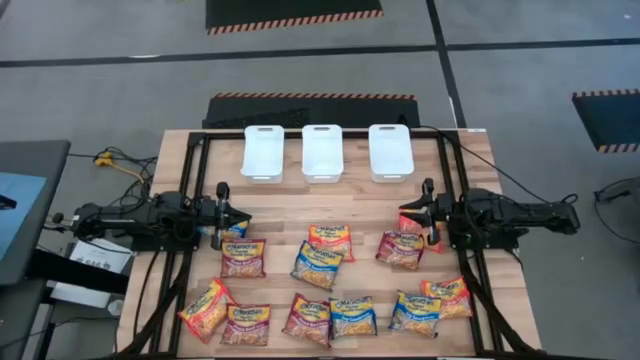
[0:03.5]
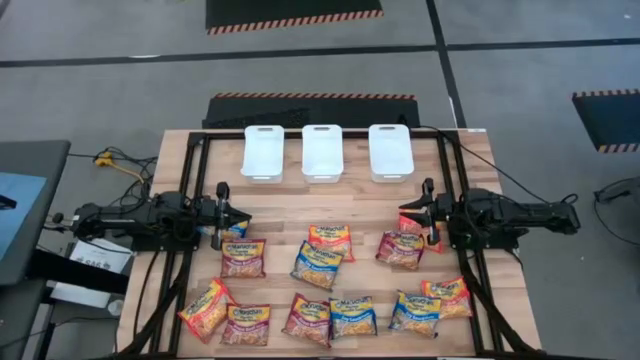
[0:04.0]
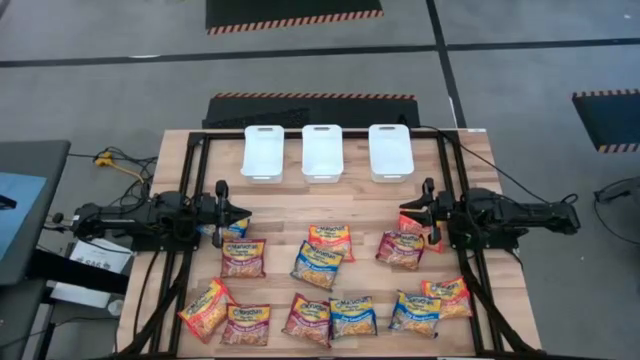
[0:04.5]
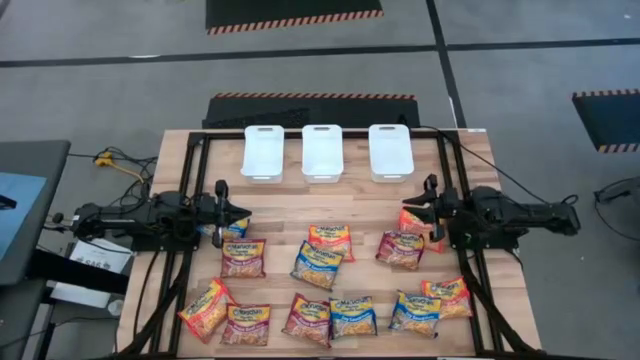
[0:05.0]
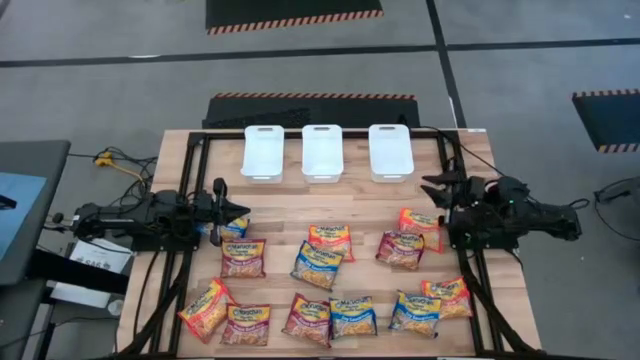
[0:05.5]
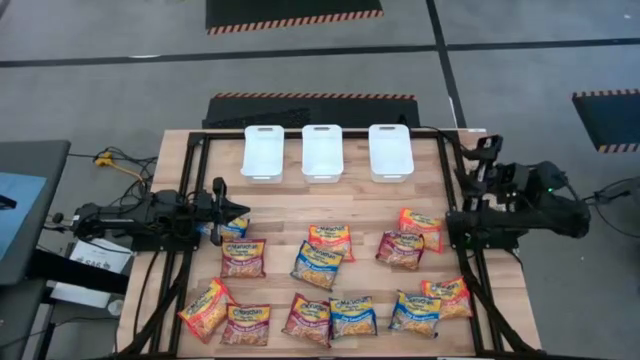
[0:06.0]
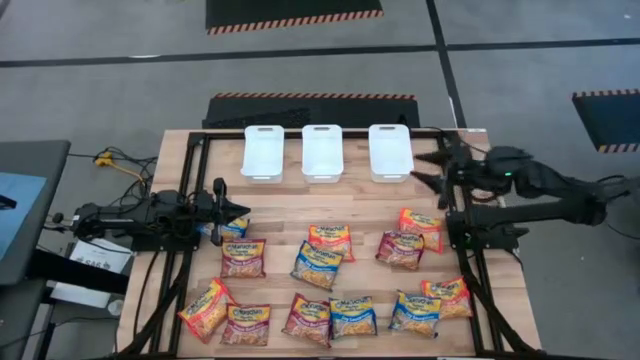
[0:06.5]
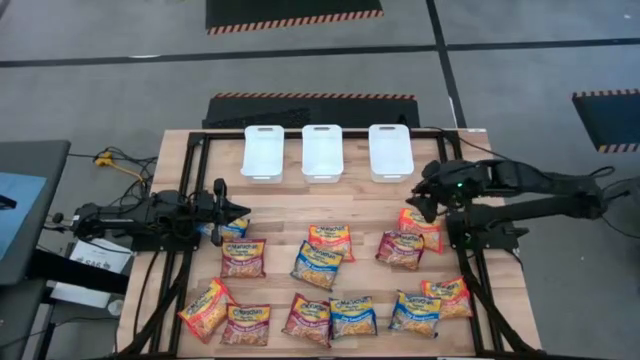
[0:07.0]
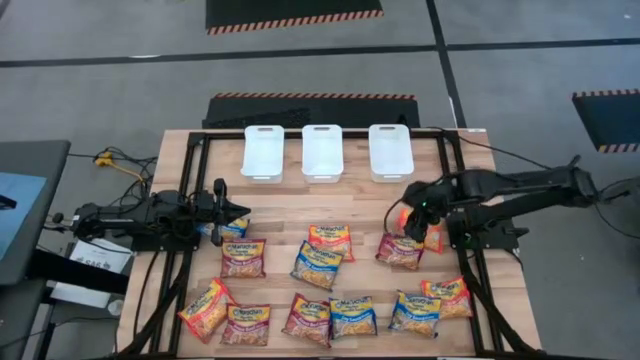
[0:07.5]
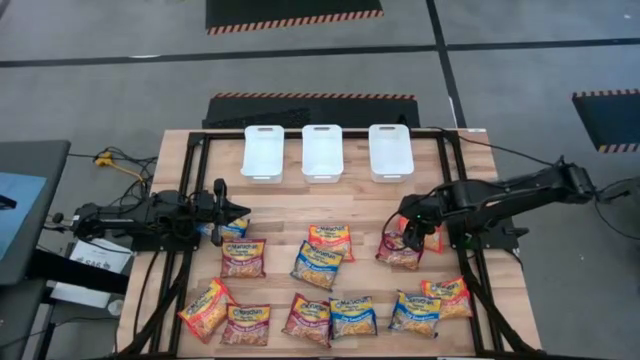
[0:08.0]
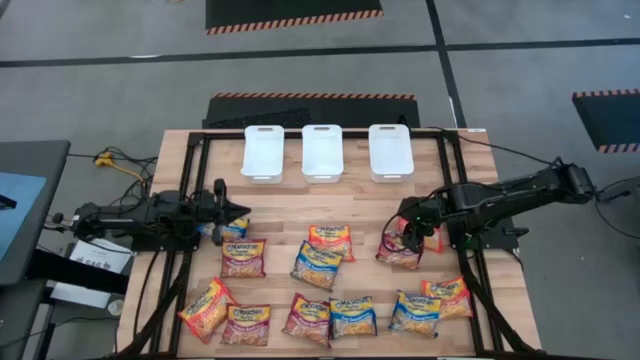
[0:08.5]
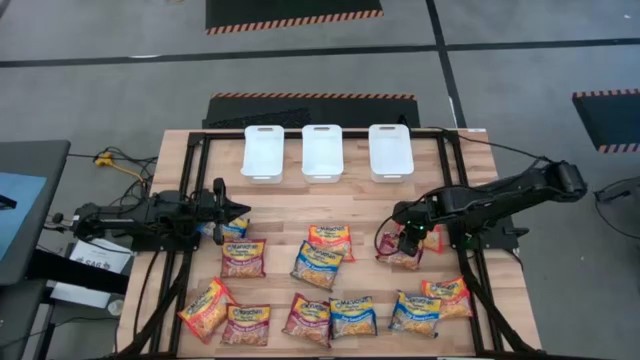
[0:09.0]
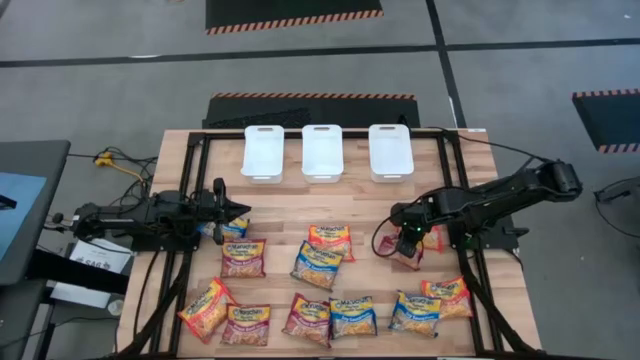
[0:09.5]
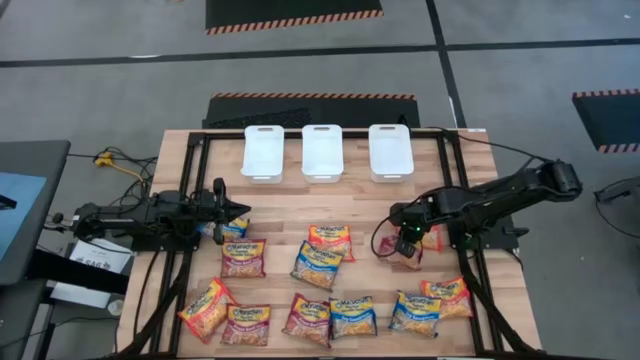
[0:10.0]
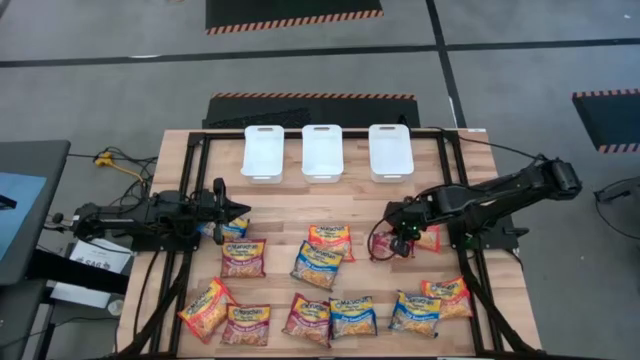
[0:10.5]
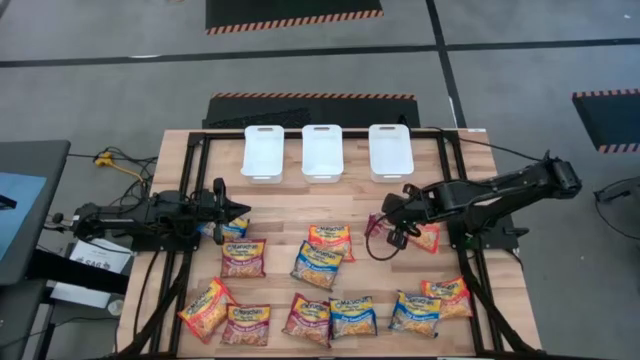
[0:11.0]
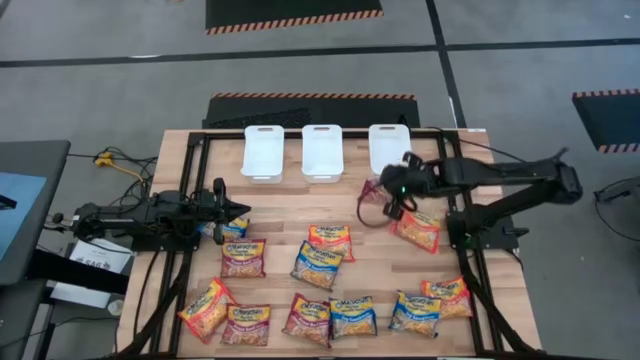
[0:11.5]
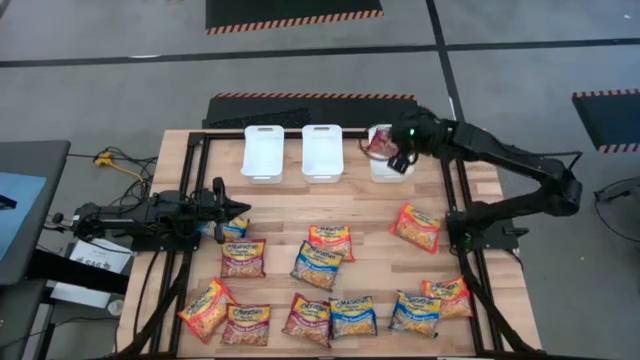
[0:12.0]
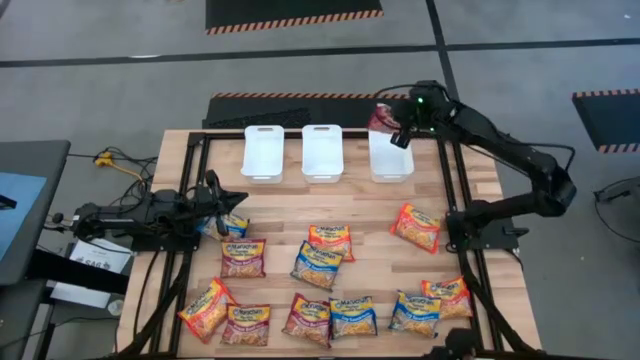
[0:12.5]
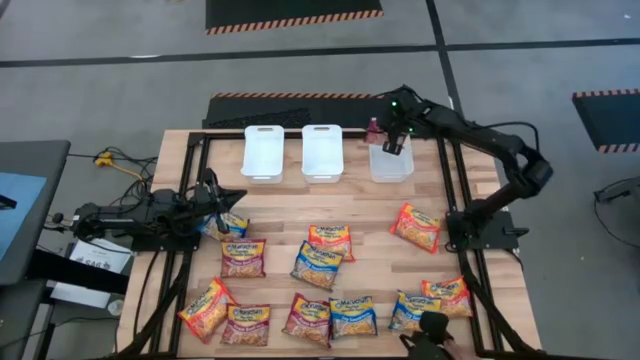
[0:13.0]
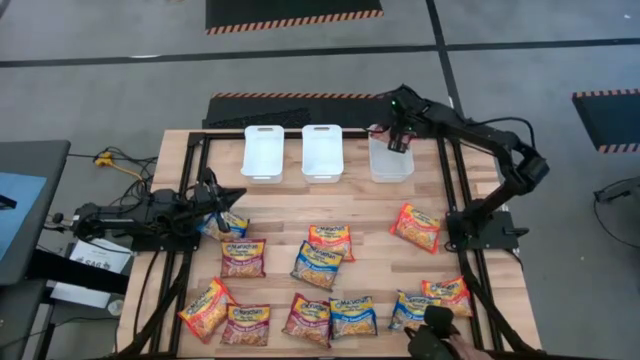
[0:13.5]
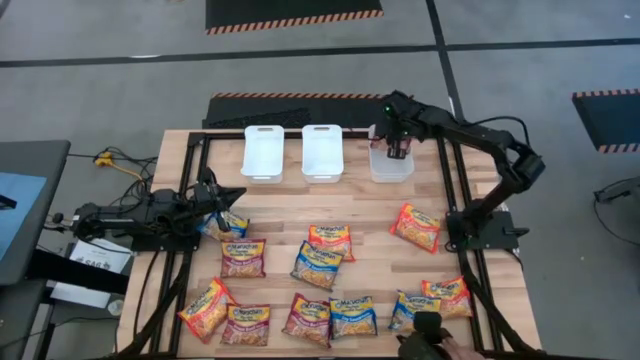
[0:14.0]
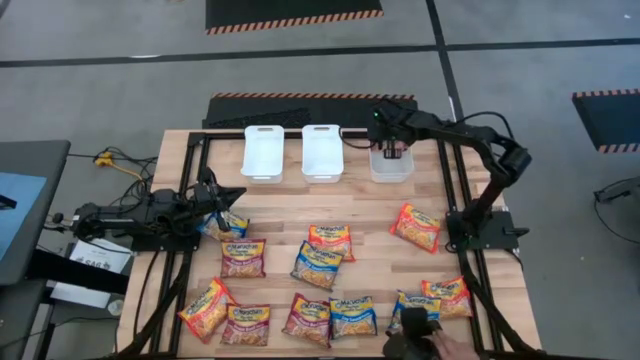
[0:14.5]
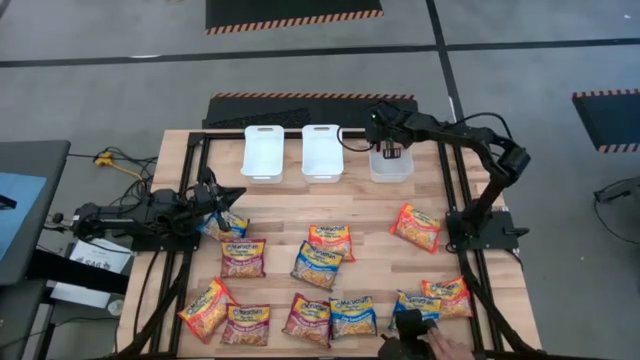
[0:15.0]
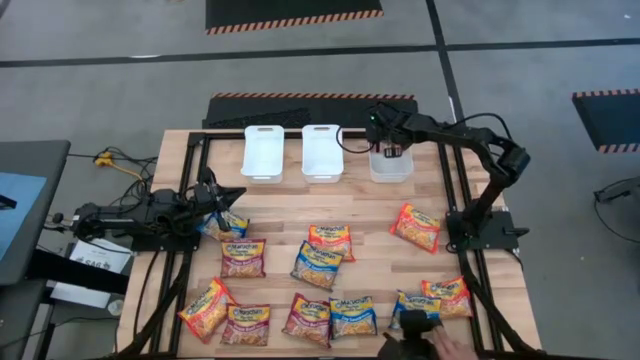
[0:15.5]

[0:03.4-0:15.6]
Task: Sort Maruchan noodles
Put the red noodle pack into the right white bin

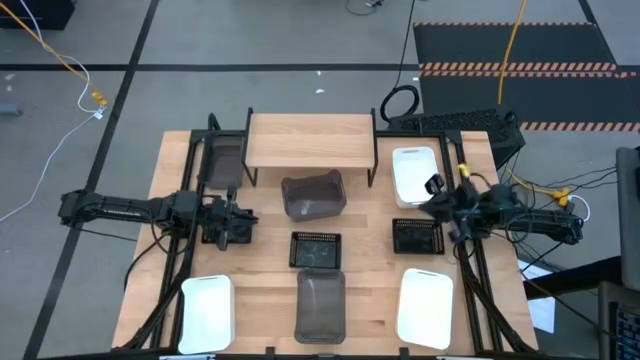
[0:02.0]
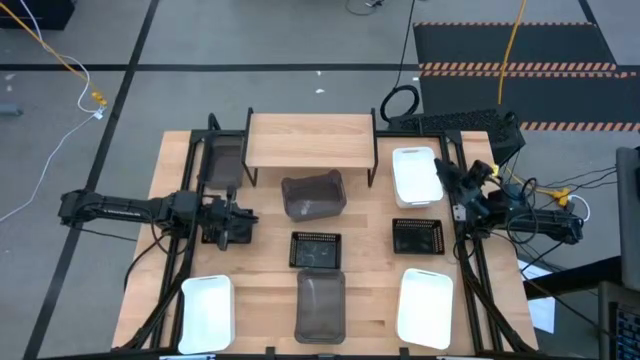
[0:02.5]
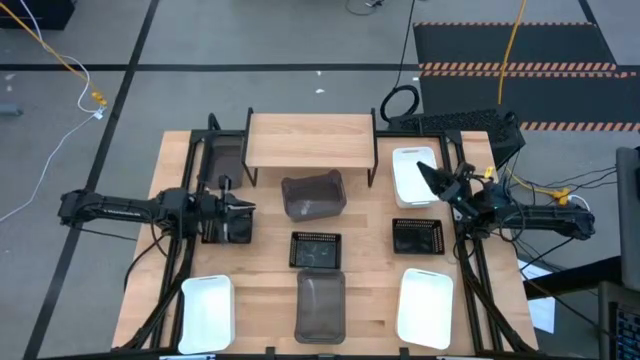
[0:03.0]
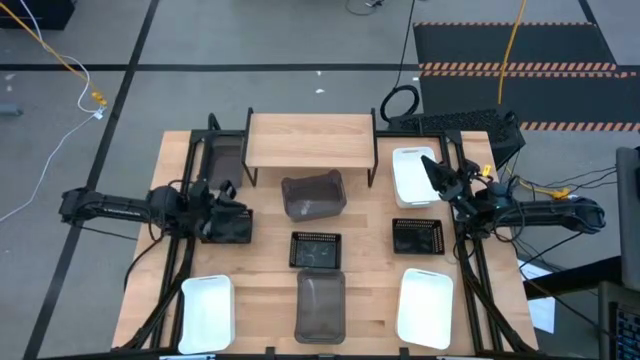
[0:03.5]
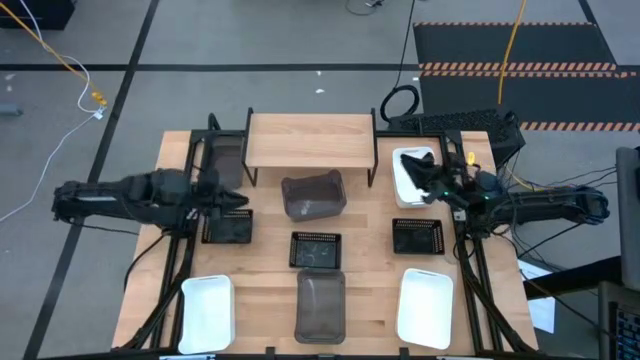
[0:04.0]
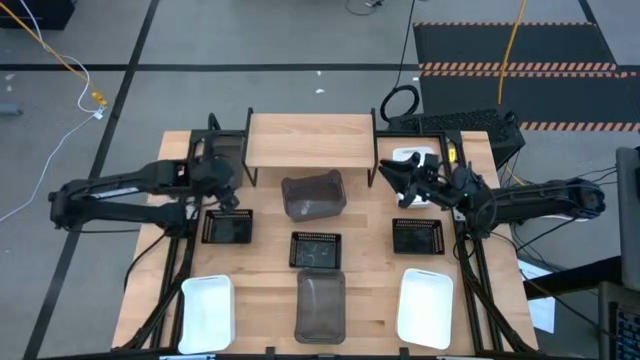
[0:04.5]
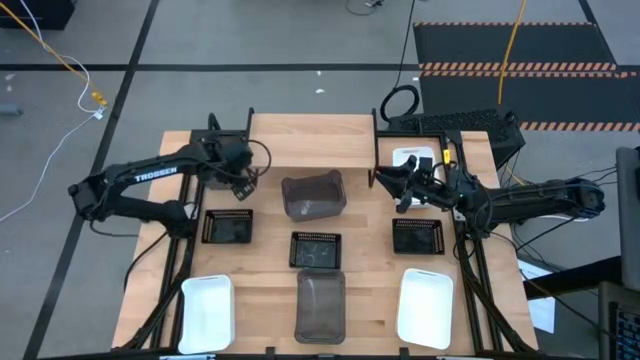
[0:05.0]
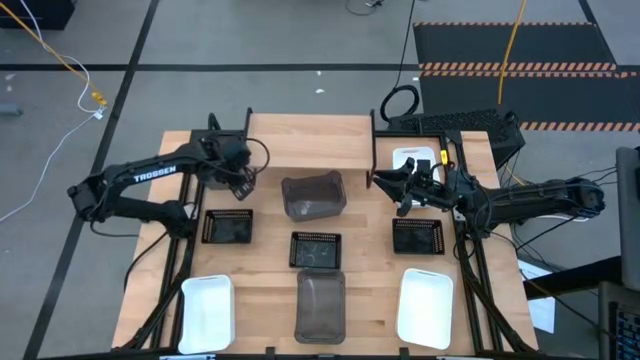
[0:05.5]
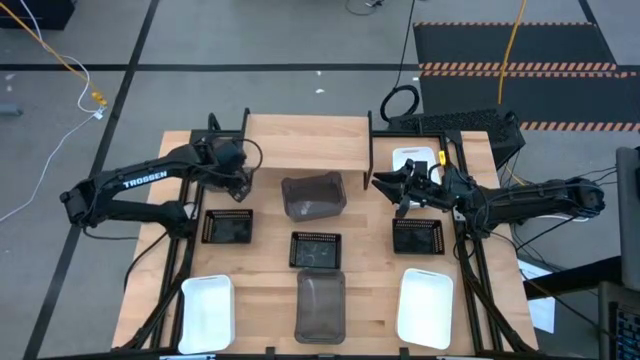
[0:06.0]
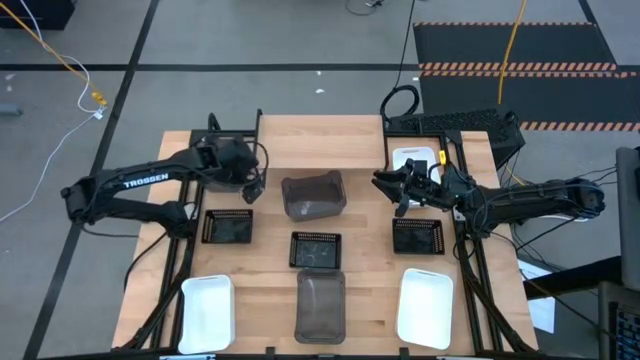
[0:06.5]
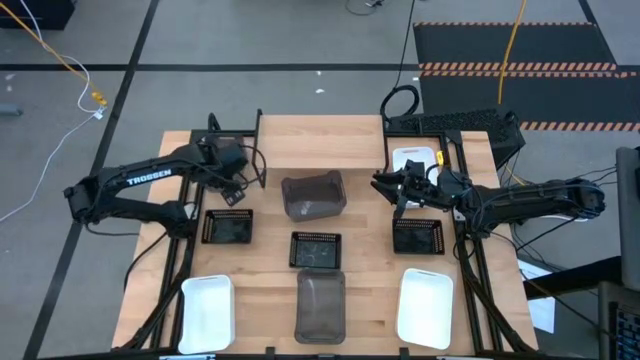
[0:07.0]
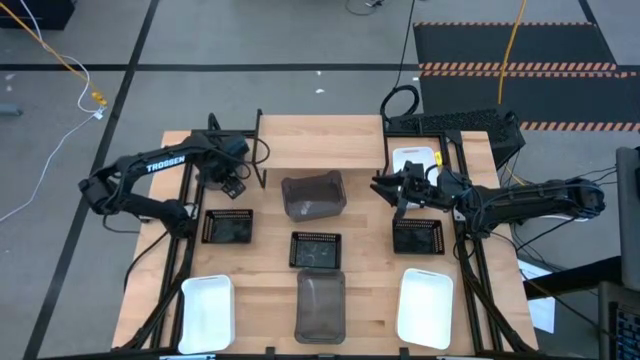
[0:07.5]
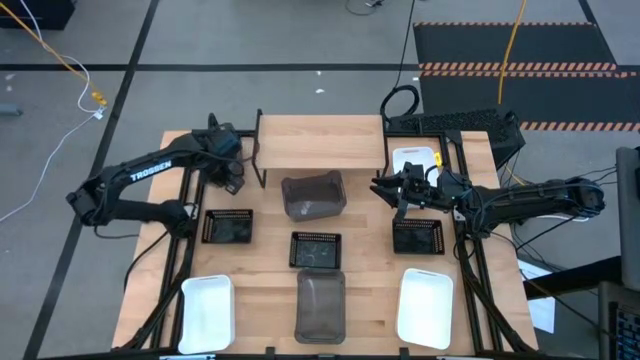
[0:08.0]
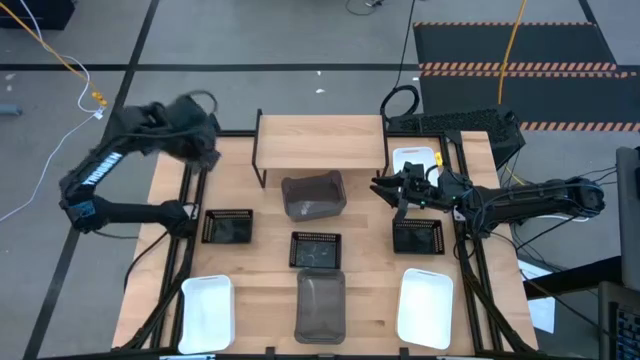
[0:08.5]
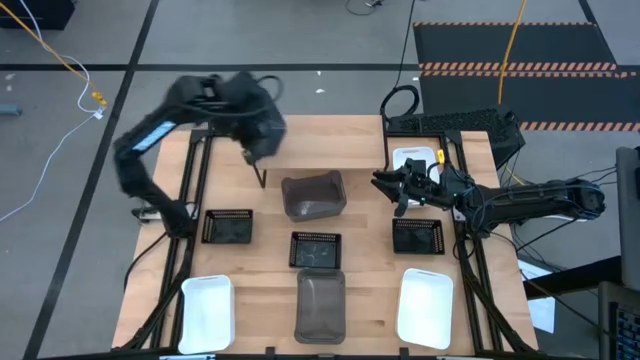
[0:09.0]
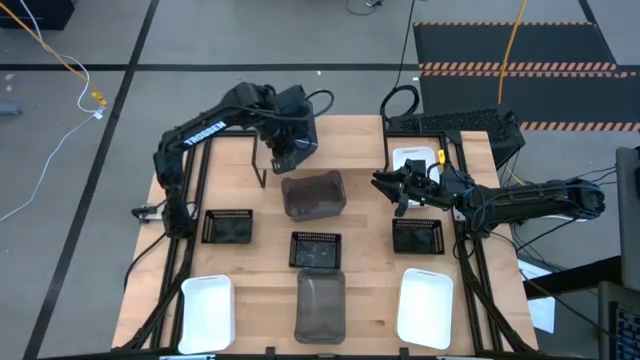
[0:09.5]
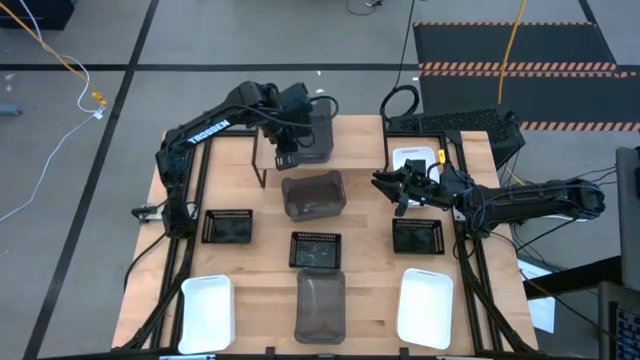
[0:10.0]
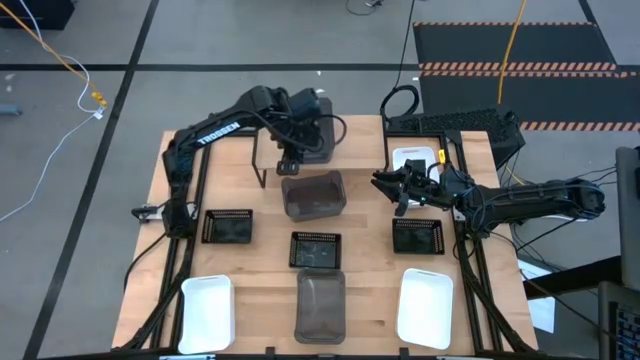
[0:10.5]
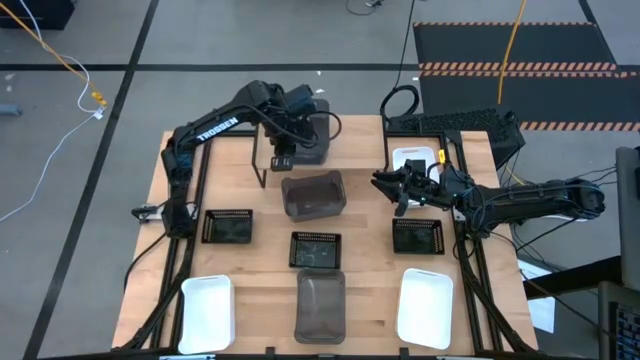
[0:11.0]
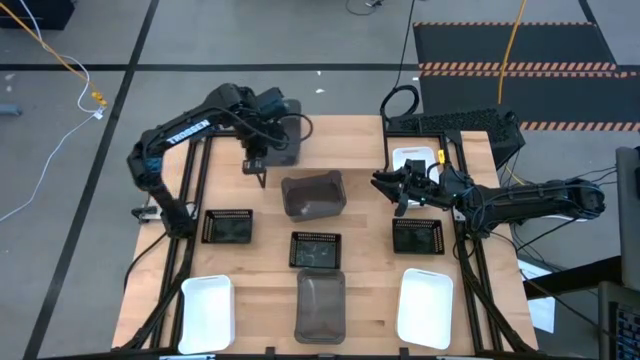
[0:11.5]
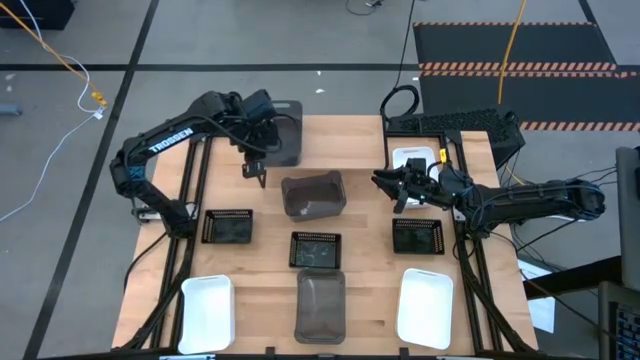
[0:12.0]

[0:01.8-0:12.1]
Task: Stack baskets on shelf by color
Put the top left light black bin on the shelf
